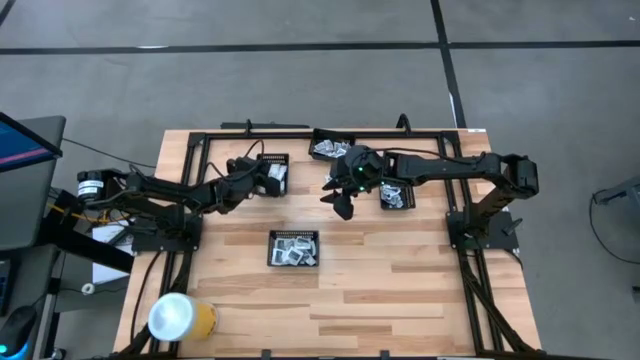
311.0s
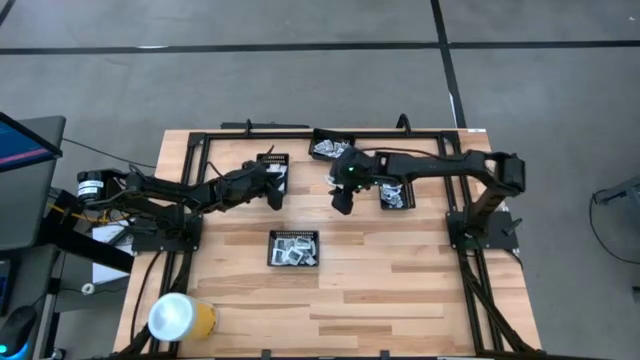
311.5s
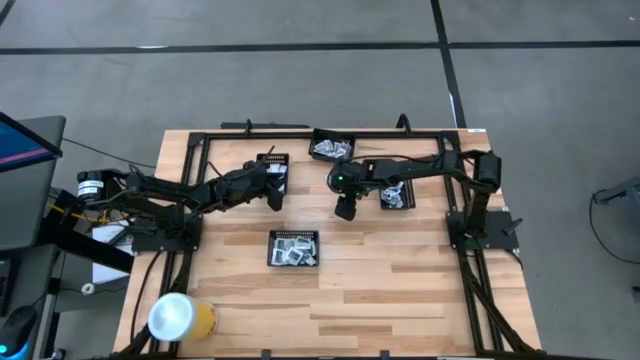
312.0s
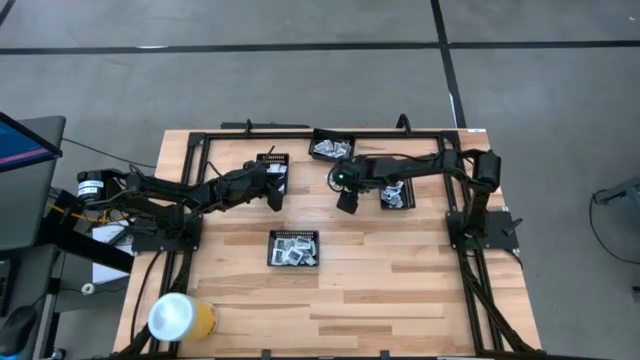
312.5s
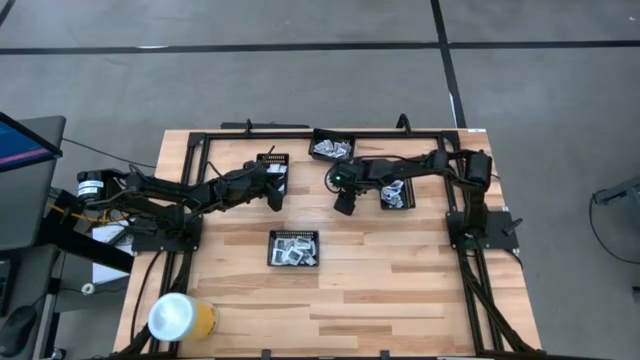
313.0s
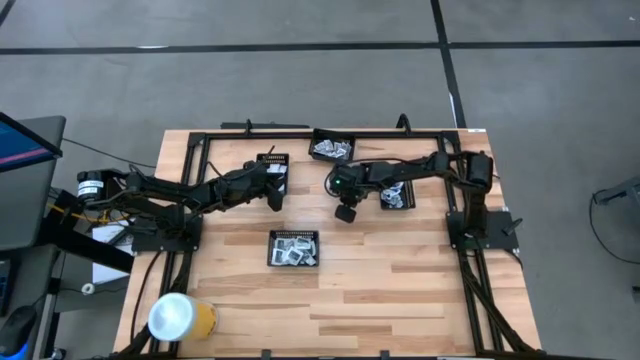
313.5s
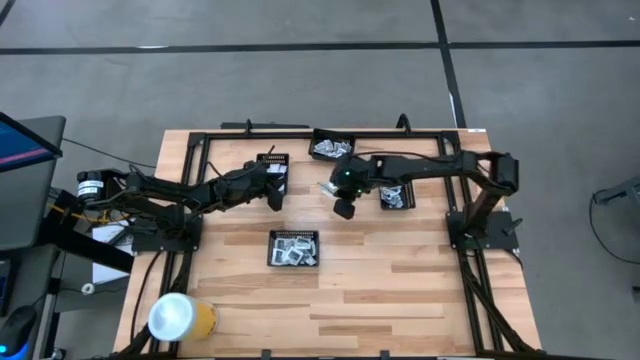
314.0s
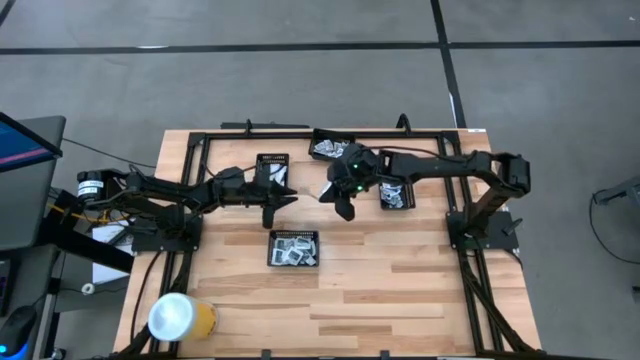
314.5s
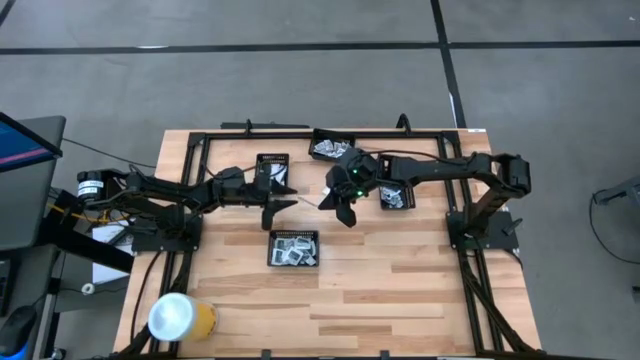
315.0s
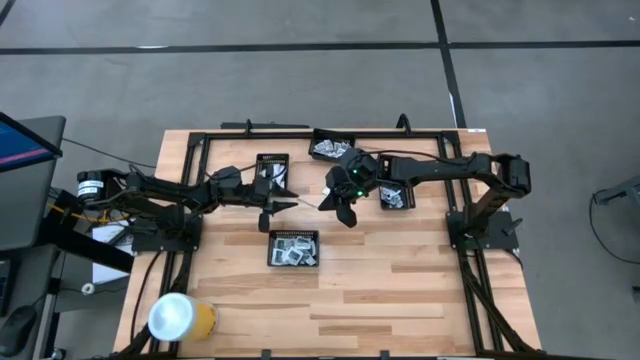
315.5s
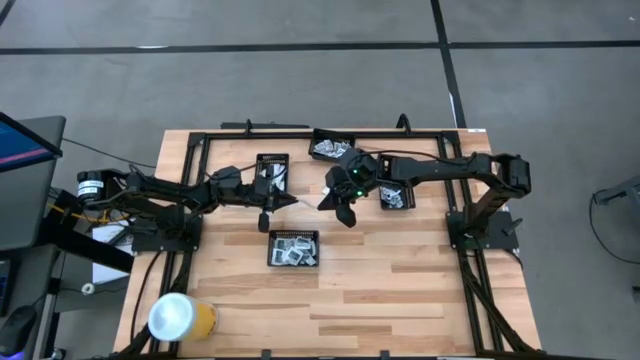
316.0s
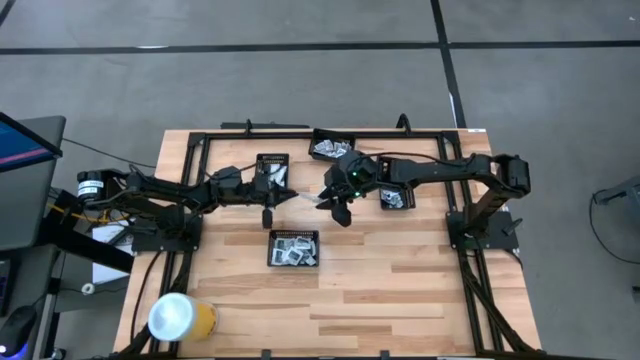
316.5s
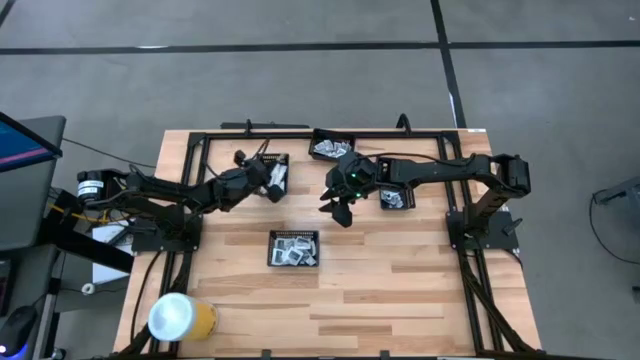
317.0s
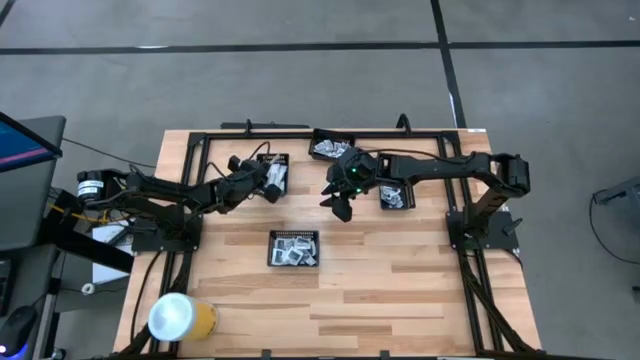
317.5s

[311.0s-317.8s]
Task: Pick & Place First Aid Supplies
Put the green bandage into the left black bin

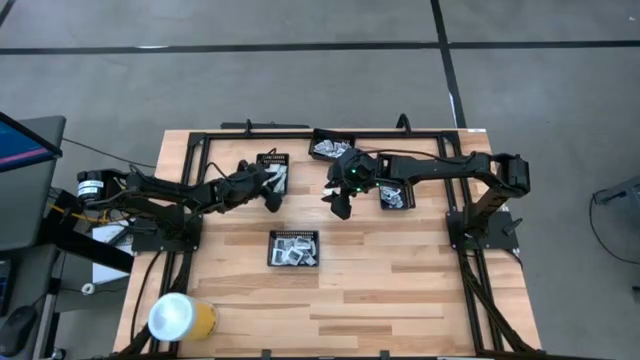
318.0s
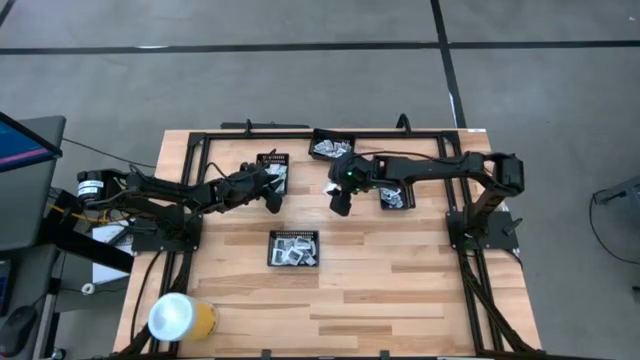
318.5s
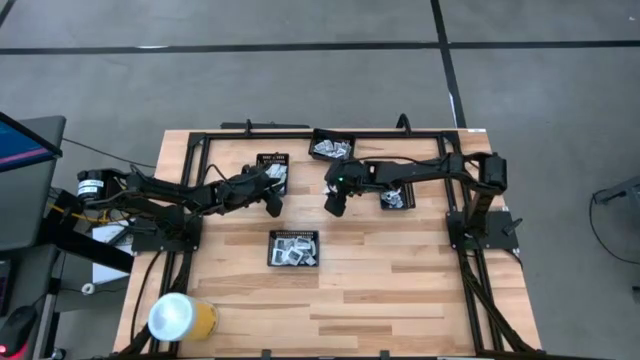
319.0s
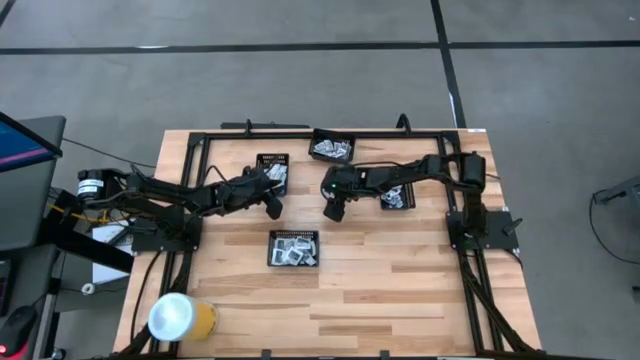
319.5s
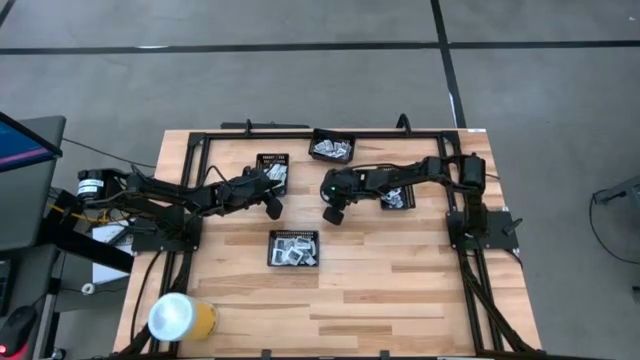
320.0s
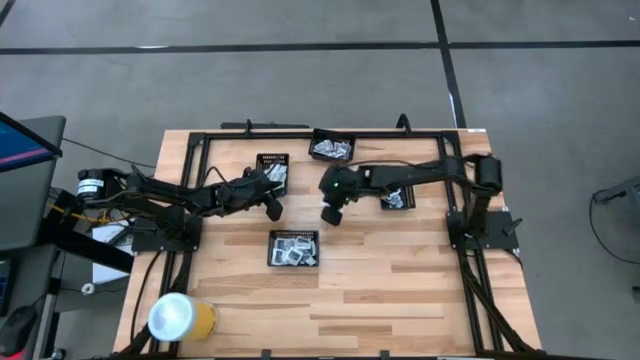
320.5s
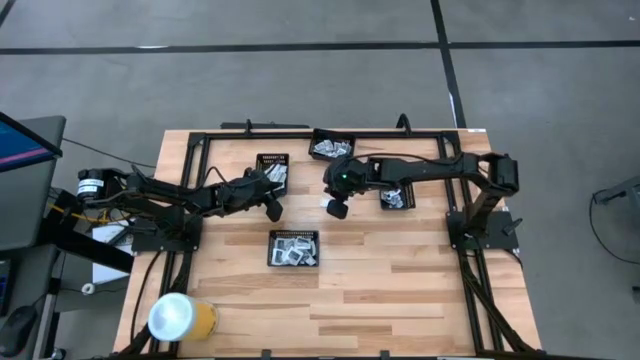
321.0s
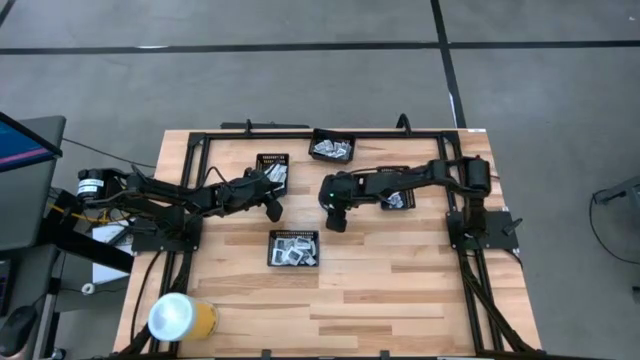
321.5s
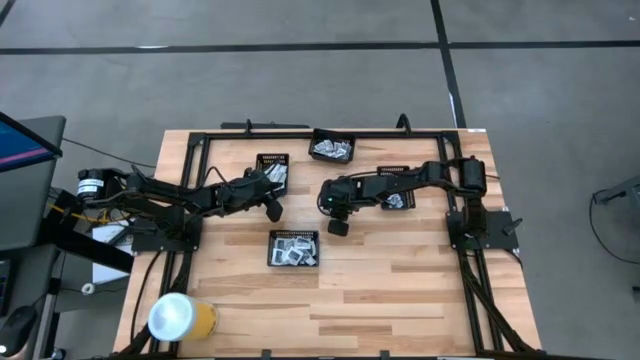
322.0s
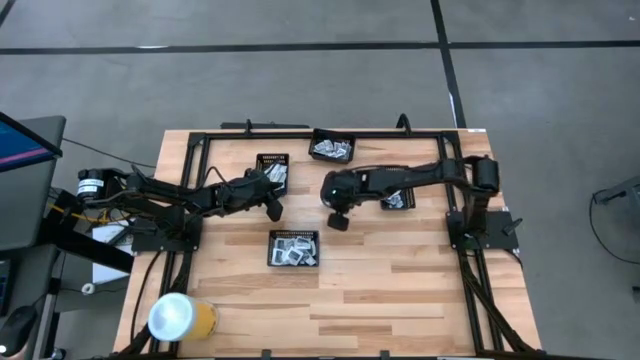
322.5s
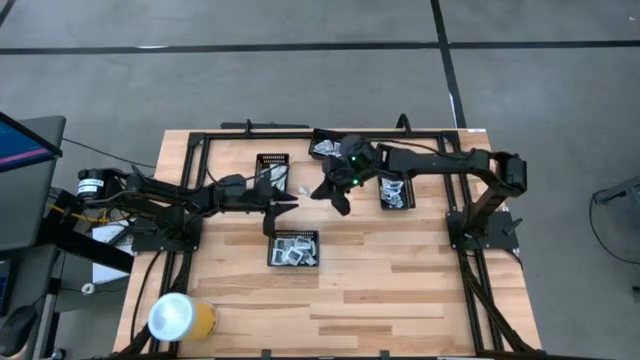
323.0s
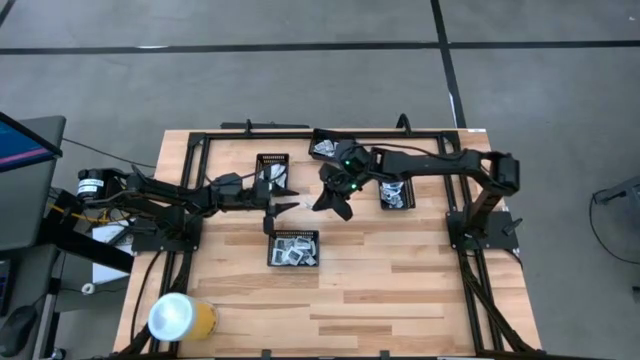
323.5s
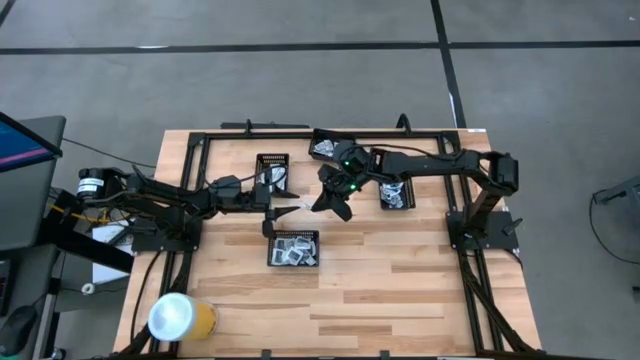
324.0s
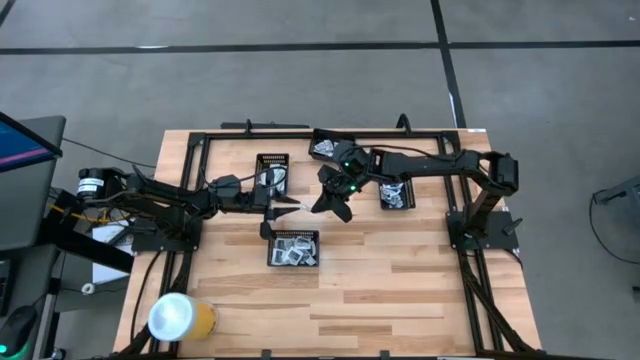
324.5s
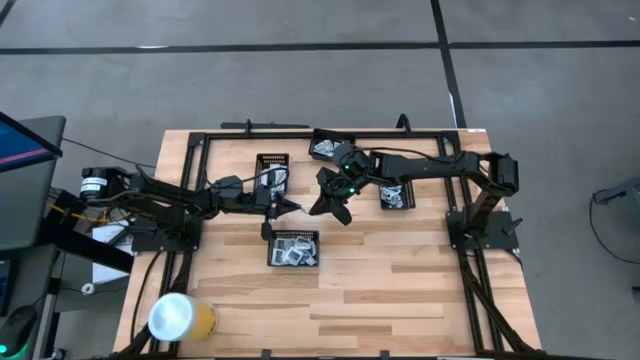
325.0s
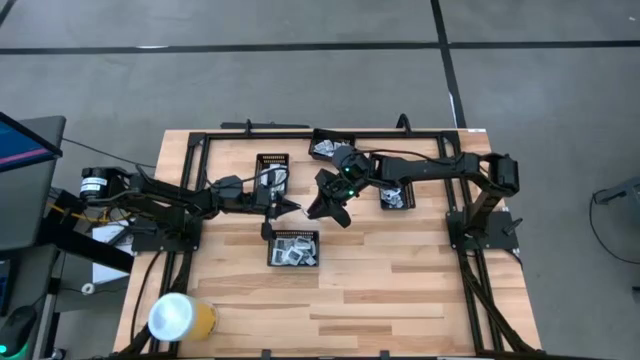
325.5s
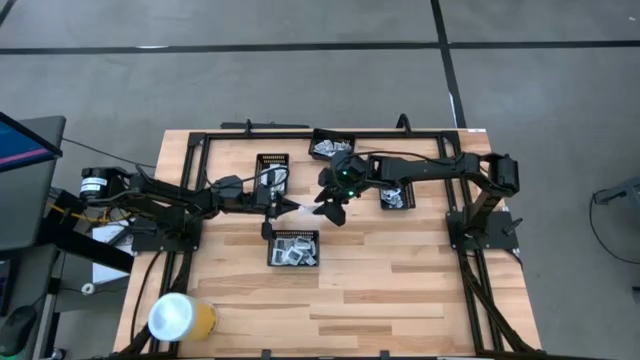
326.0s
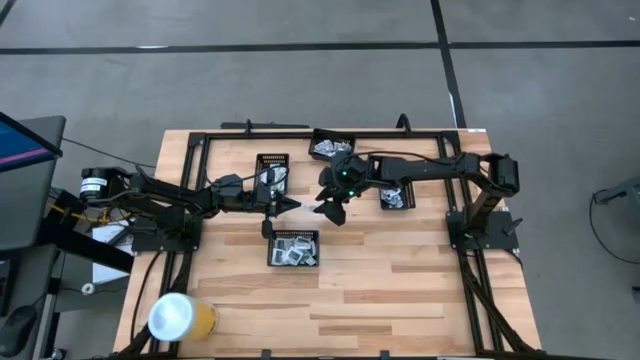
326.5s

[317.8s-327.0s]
Put the green bandage into the left black bin

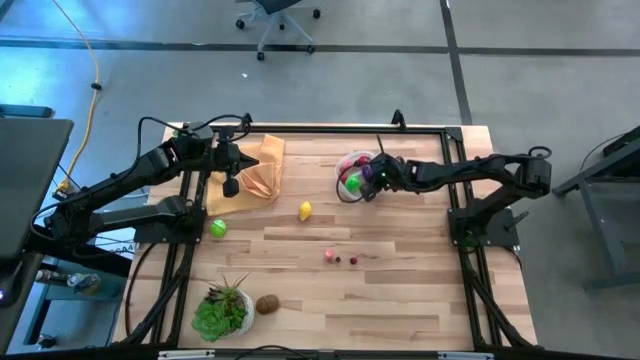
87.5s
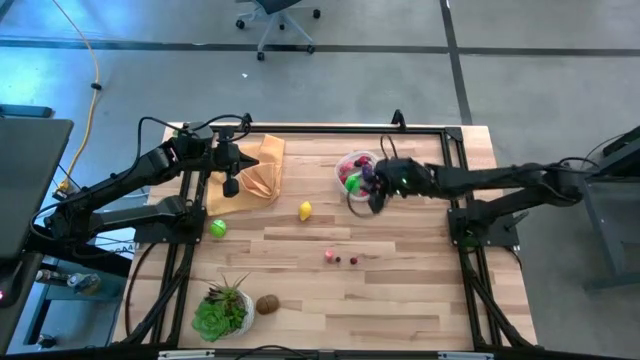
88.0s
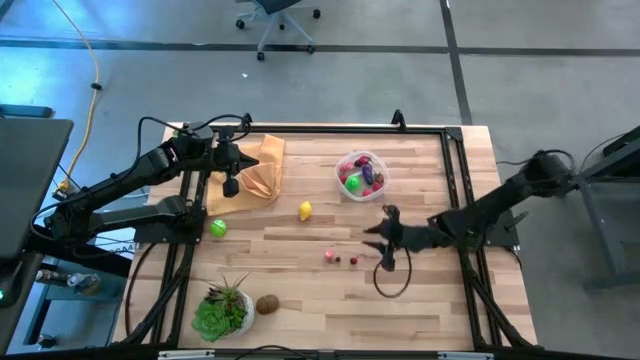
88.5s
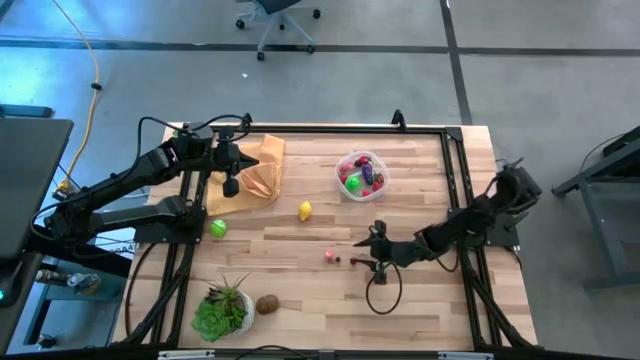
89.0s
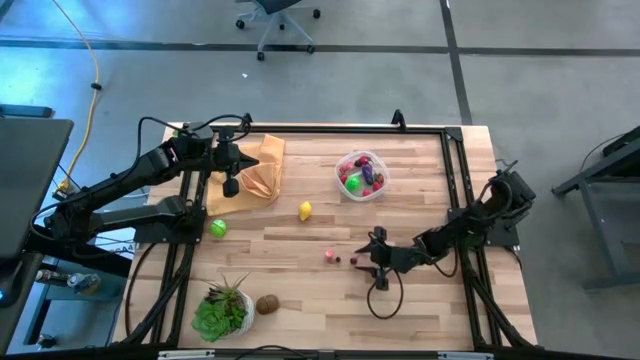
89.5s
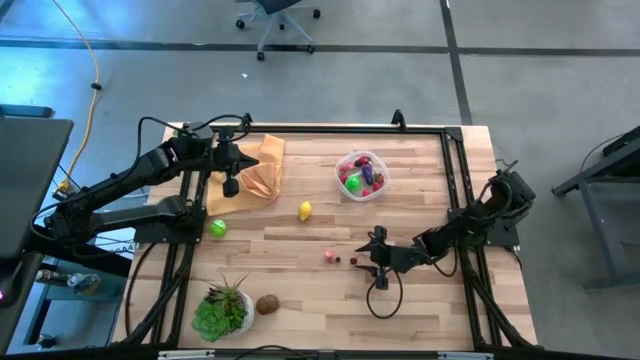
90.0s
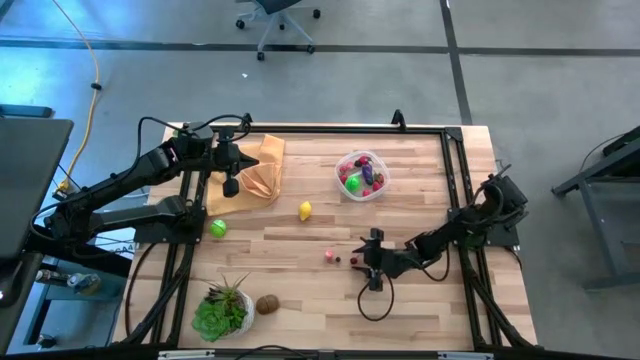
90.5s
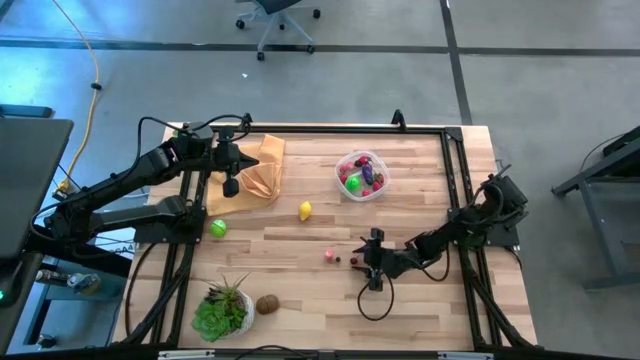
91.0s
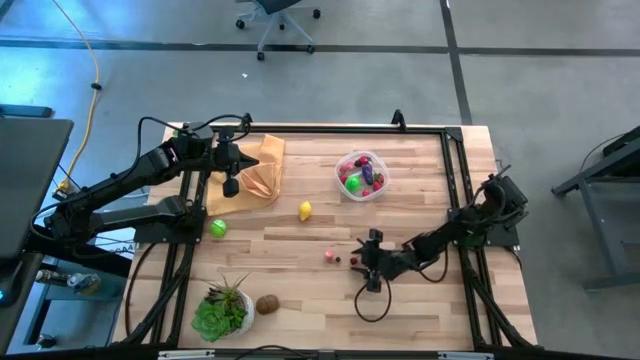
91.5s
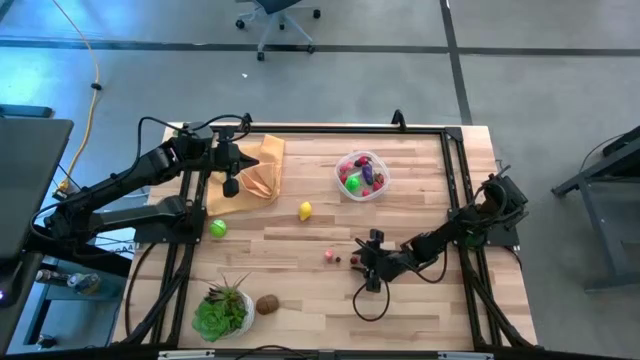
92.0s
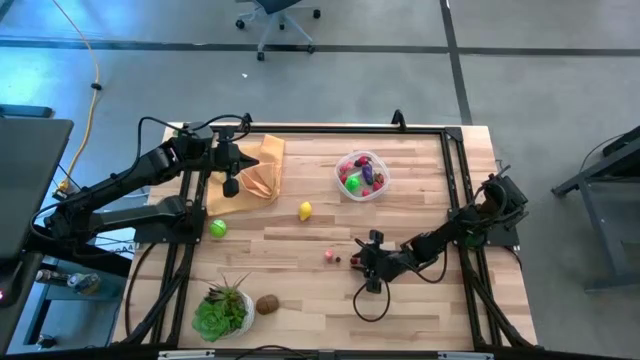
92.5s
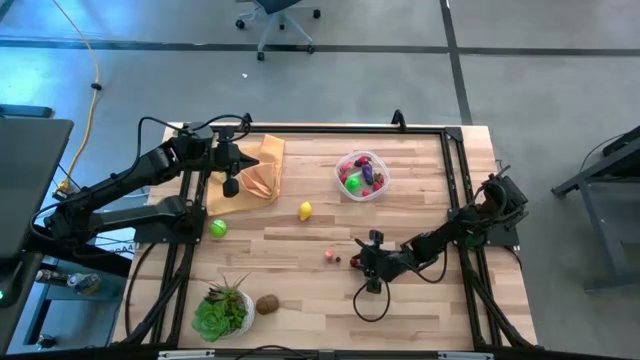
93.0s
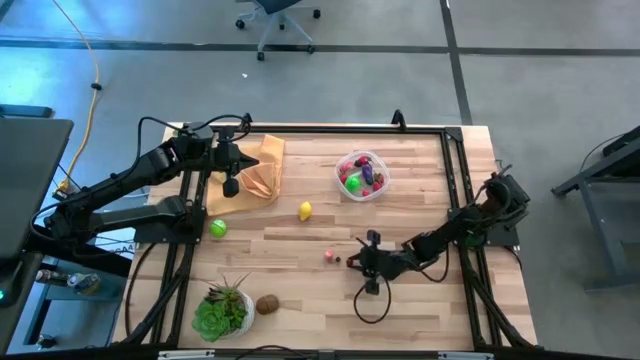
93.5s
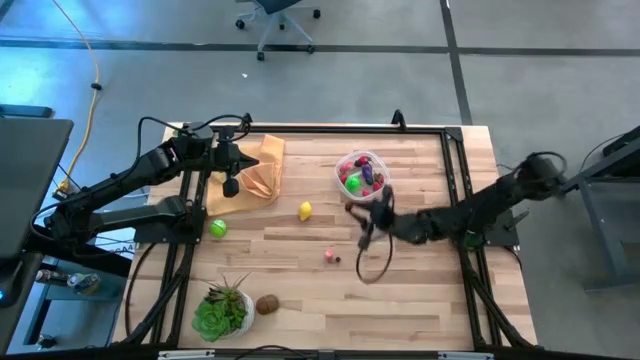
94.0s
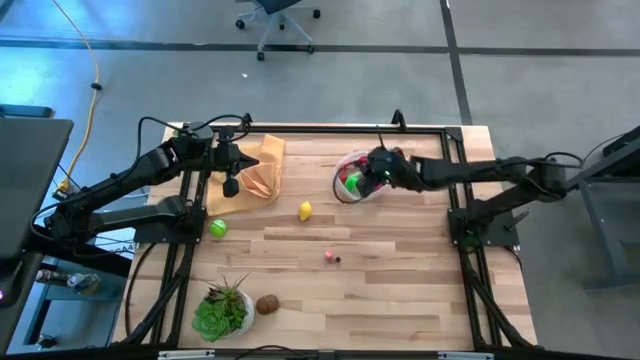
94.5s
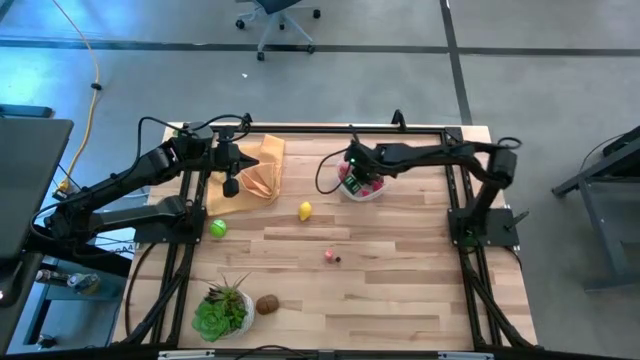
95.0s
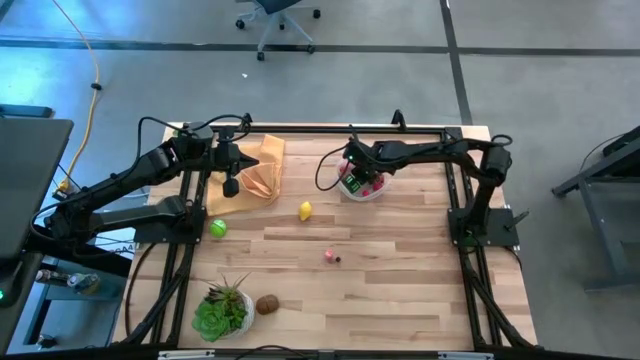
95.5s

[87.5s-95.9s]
Task: Pick and placing Produce into tupperware
Put the red and black cherry into the transparent container
